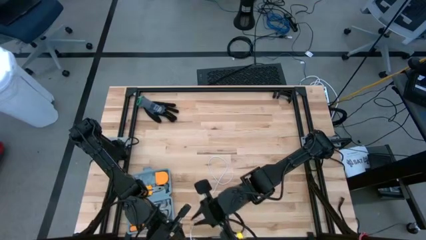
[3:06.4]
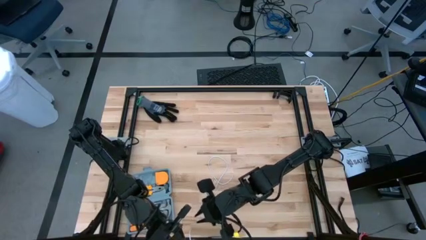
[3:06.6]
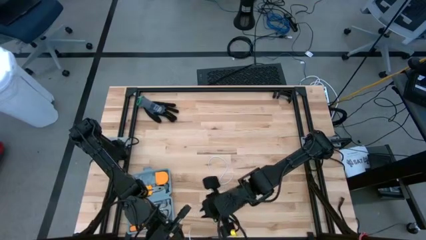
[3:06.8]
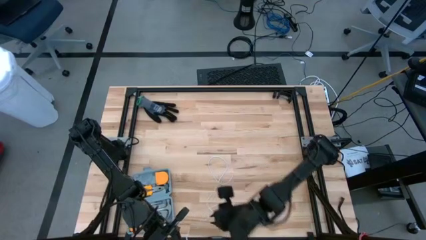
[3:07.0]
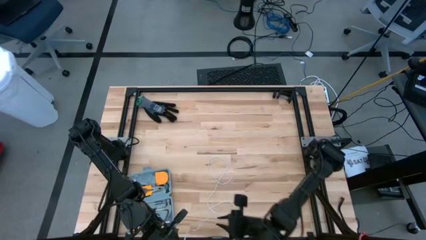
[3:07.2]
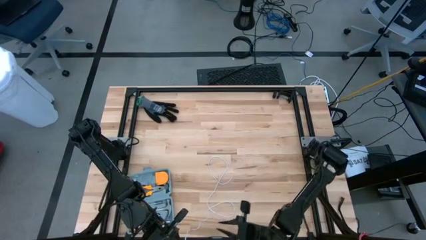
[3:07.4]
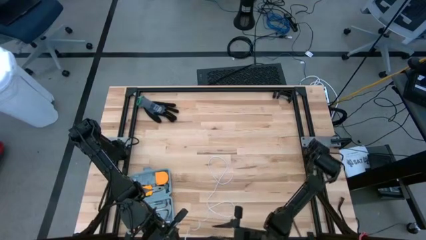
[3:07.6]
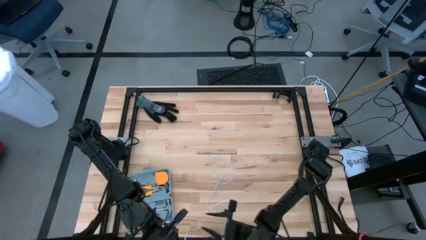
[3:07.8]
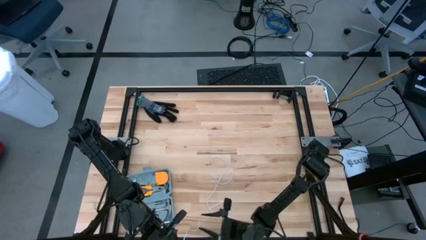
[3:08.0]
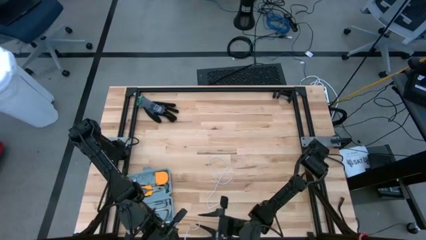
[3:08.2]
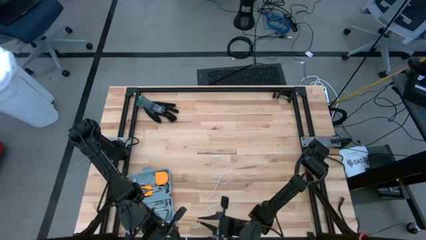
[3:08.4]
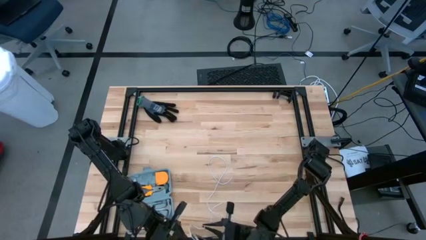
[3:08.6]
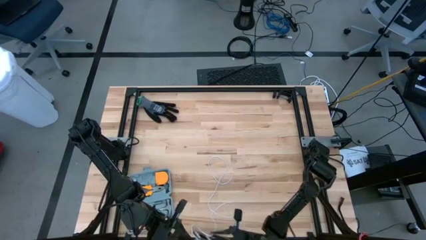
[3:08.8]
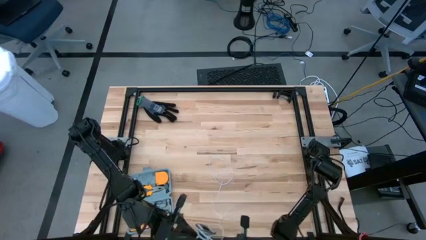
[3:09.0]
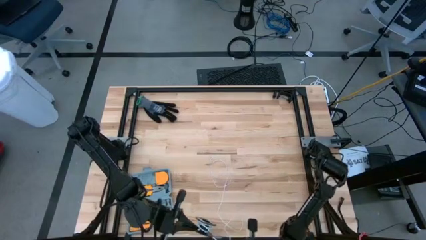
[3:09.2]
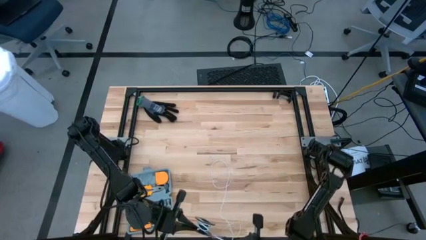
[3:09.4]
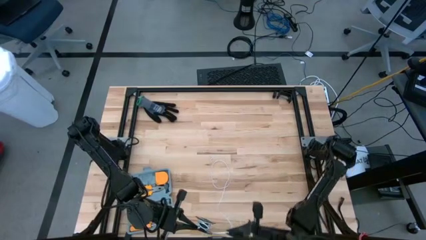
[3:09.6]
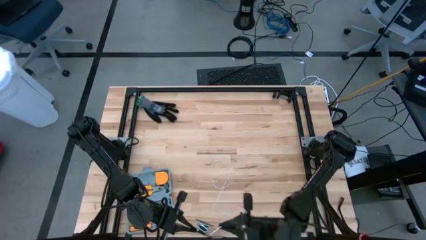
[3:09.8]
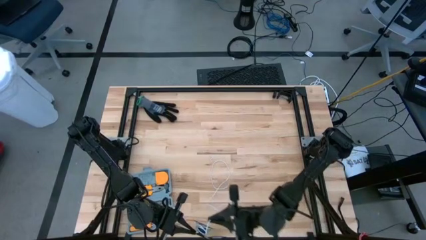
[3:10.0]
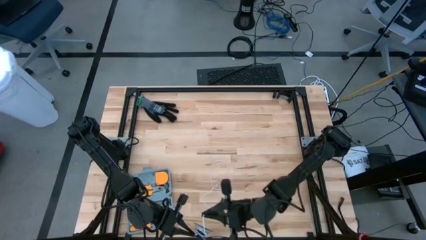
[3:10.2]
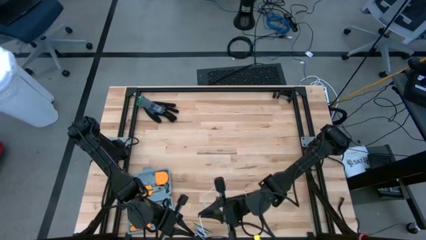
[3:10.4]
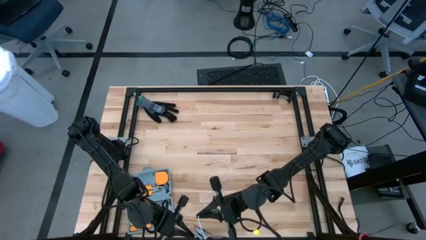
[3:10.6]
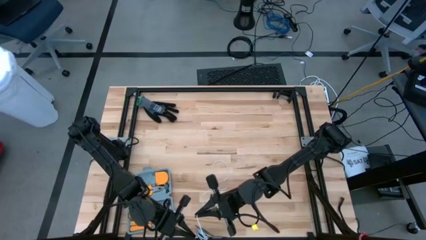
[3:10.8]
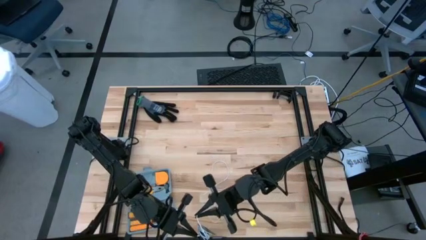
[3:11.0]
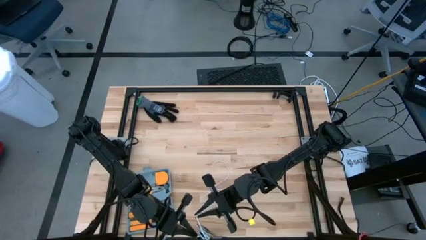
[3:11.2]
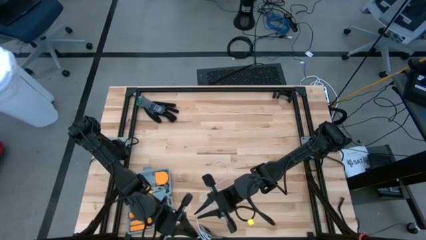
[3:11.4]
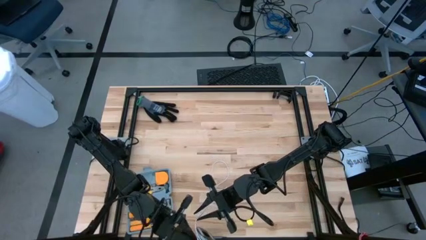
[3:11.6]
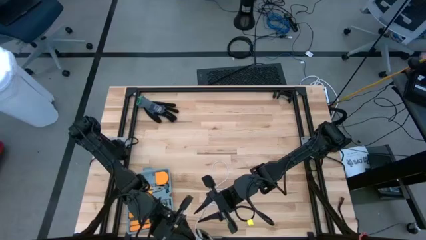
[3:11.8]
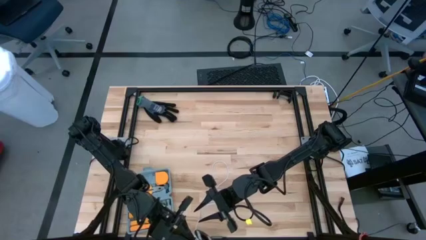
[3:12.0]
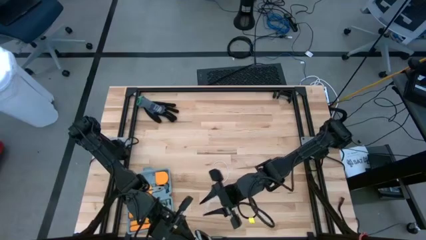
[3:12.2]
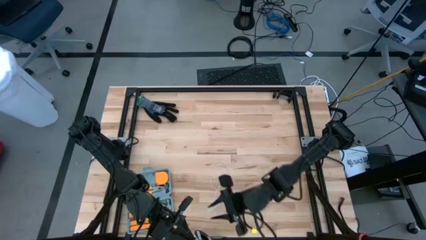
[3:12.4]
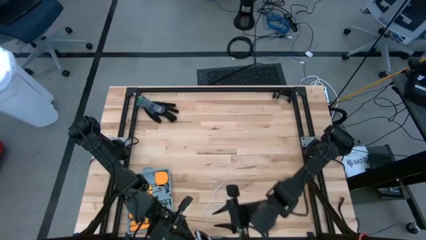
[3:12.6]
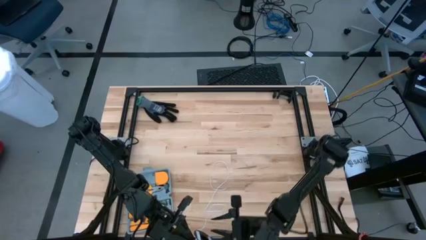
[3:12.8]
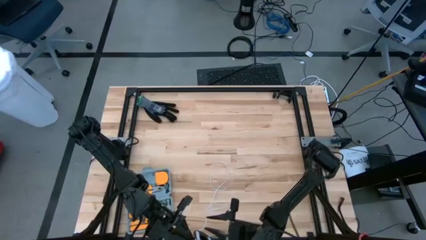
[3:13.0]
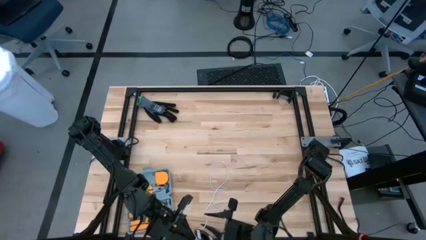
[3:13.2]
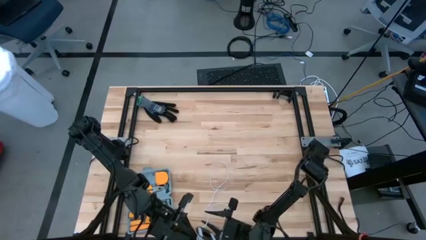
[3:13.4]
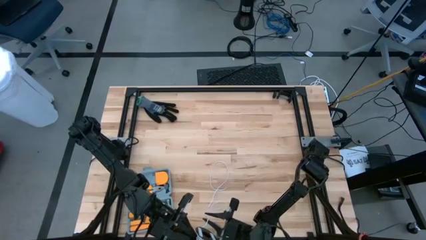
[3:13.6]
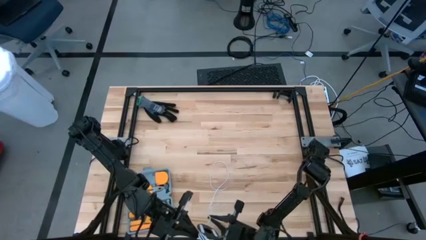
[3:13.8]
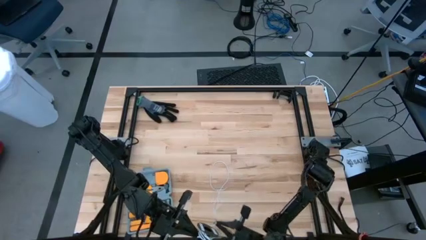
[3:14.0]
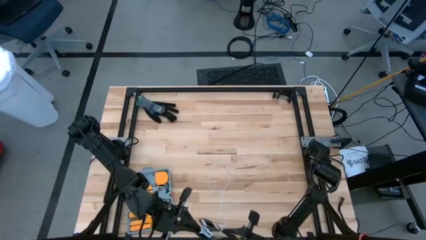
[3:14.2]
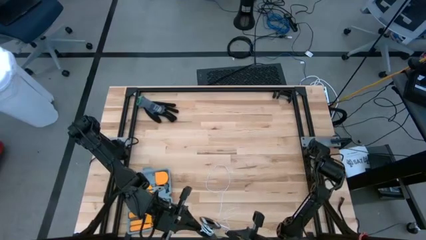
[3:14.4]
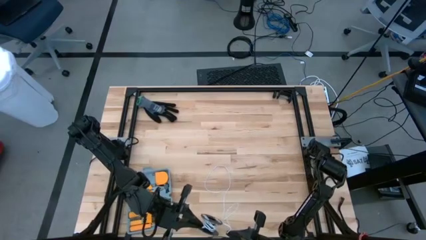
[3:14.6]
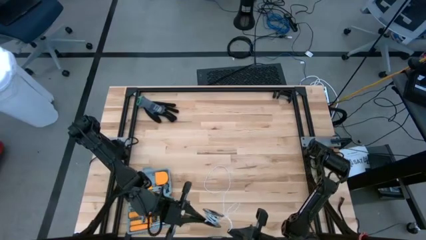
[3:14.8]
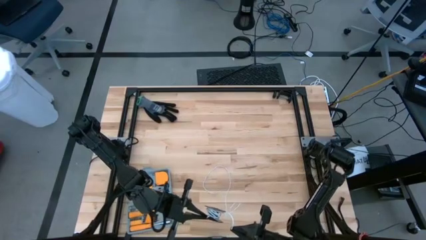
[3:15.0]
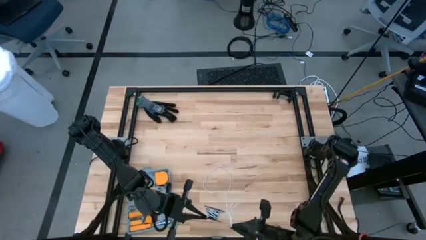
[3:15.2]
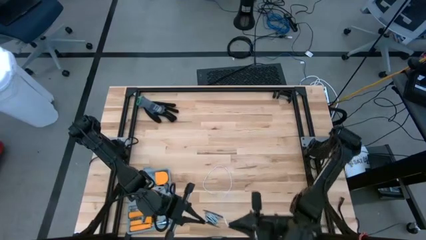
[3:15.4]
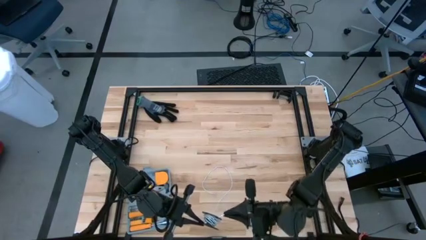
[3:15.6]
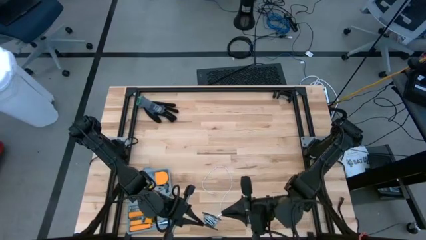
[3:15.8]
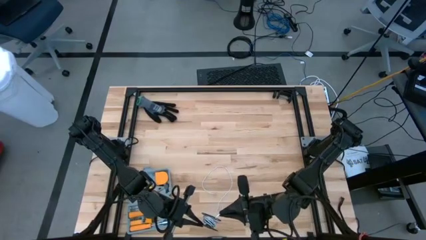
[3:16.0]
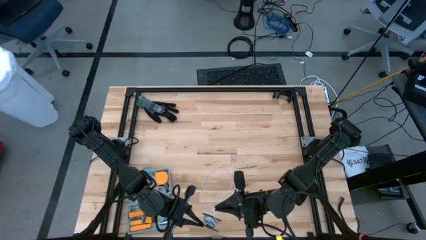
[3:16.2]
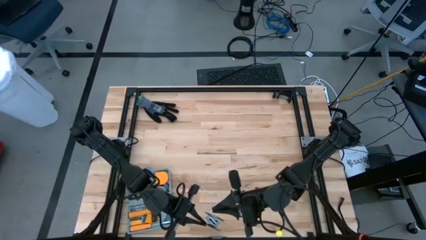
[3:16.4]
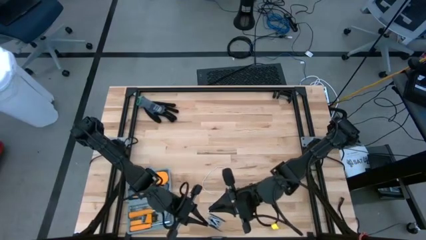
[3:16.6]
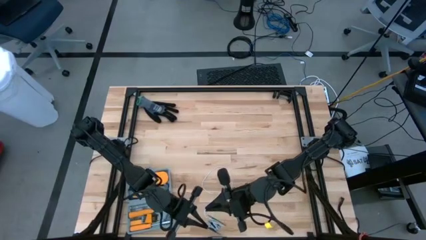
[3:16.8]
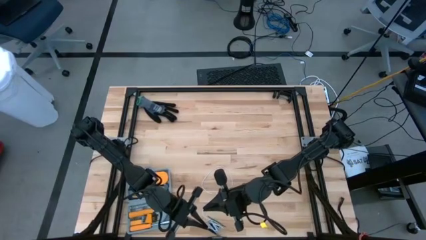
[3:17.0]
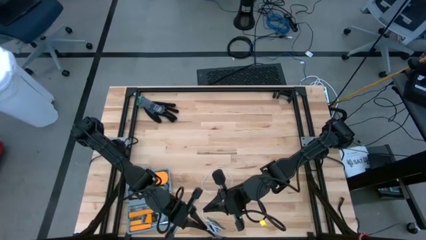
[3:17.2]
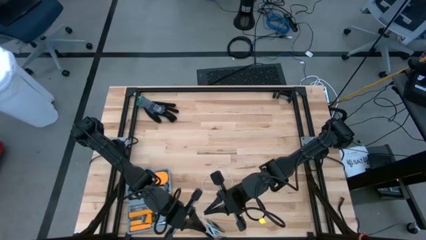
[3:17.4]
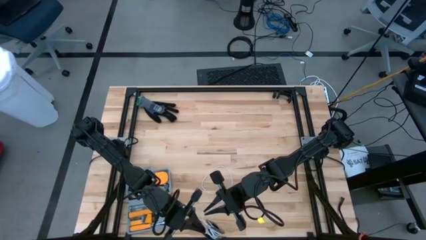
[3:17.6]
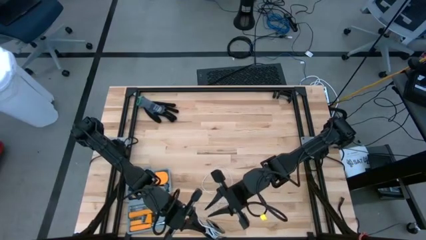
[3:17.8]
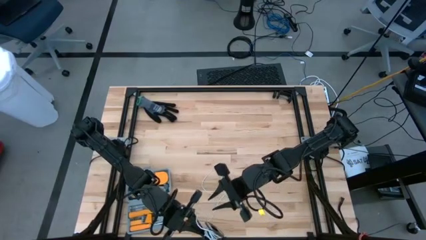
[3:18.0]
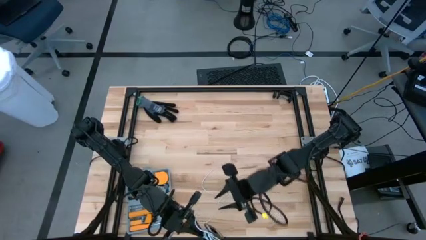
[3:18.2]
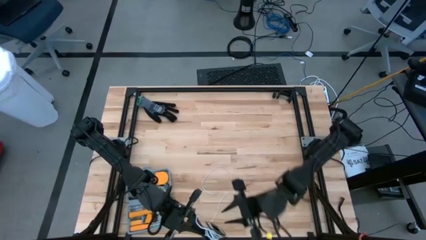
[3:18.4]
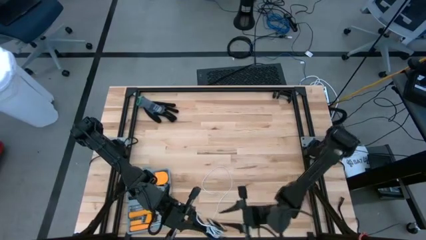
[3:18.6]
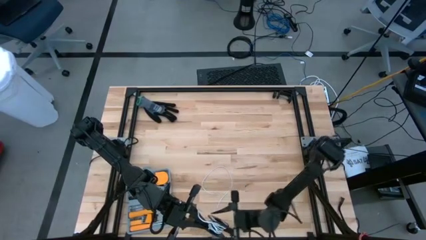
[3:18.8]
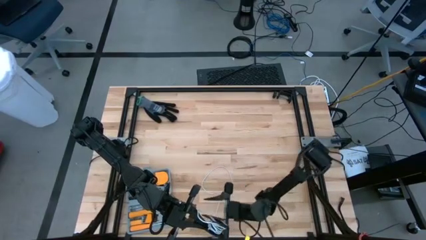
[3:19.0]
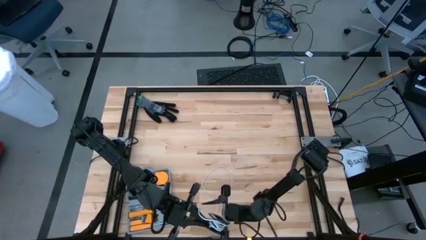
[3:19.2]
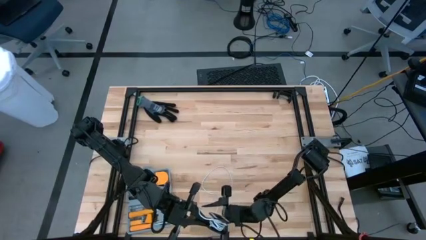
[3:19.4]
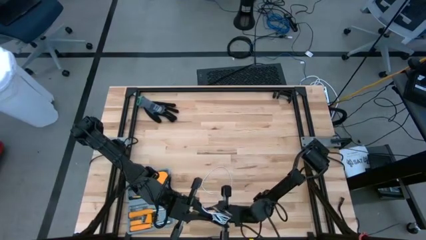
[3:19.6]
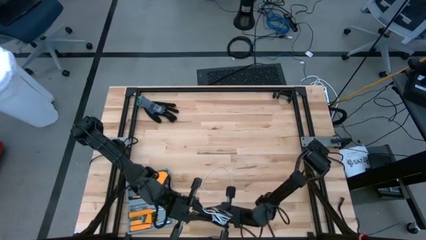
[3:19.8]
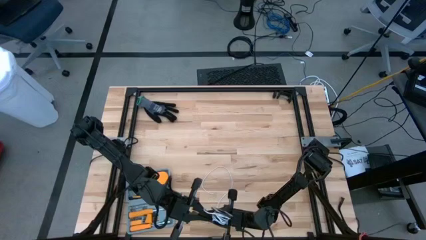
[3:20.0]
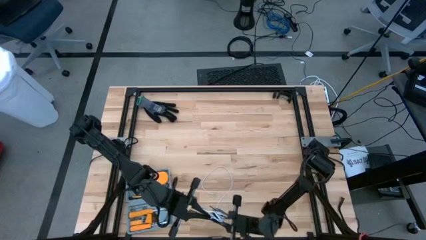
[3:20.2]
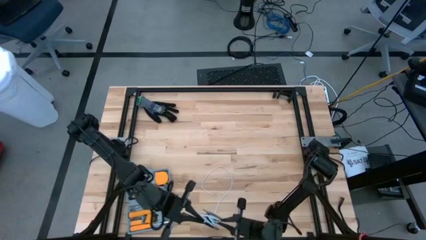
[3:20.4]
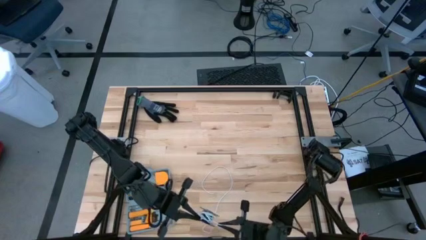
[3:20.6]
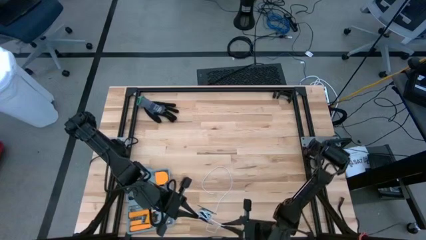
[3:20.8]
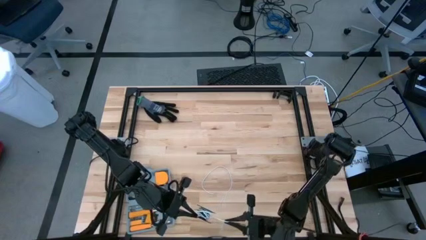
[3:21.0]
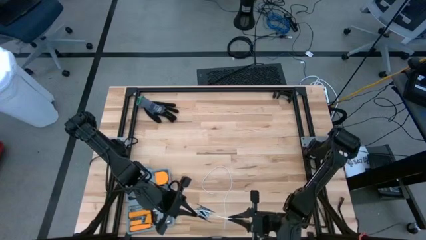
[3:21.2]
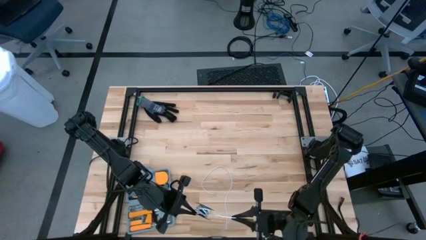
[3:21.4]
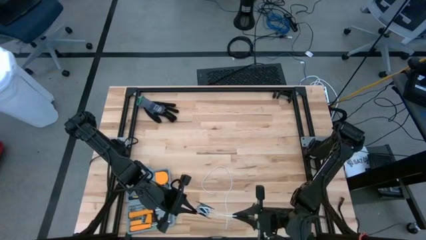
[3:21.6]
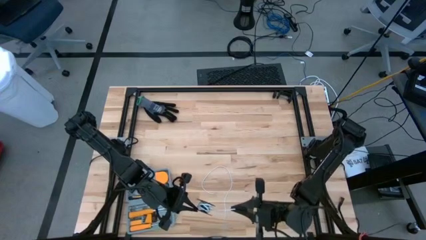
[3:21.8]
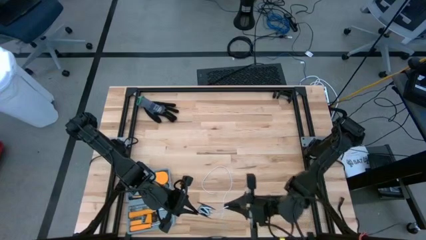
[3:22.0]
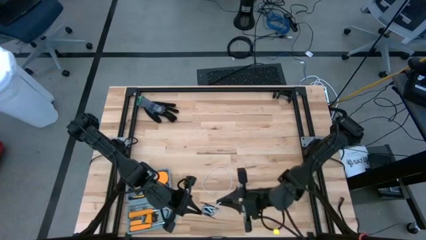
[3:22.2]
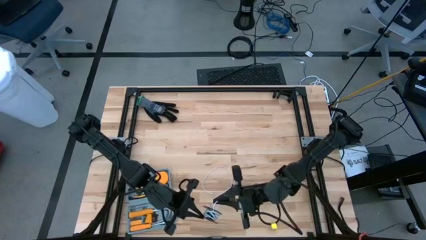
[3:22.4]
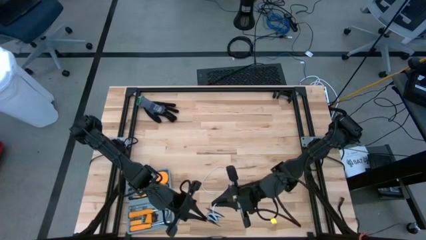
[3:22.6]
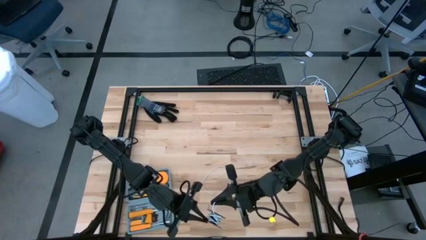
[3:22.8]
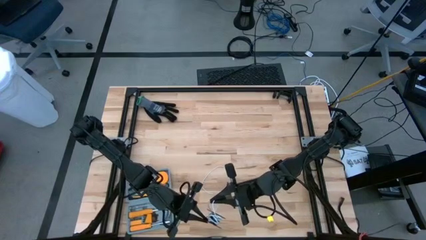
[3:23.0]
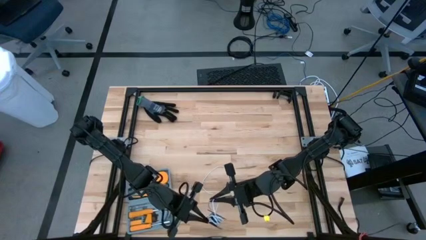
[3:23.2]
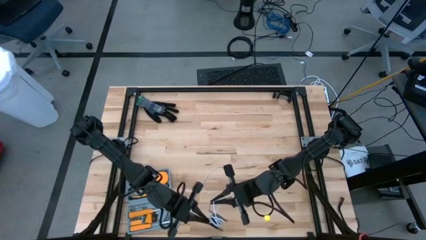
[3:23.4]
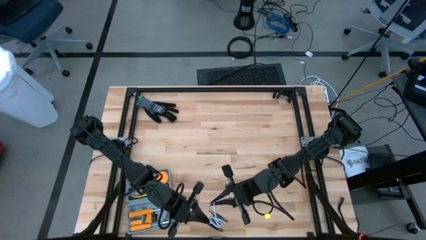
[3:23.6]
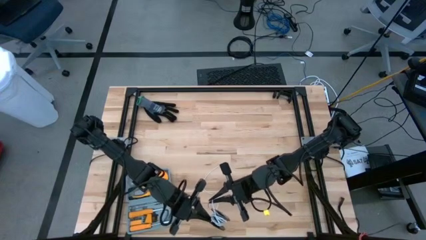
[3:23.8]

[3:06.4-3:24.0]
Task: Coil cords
Coil the white cable wire into the spool
